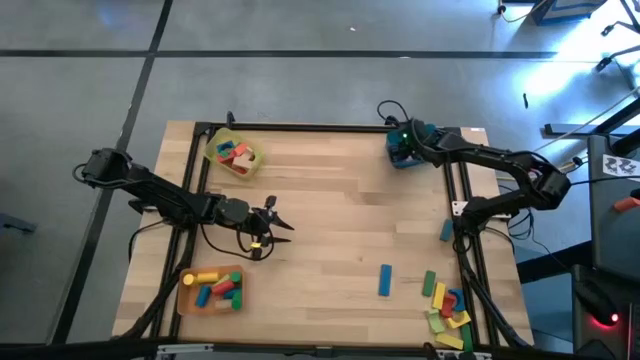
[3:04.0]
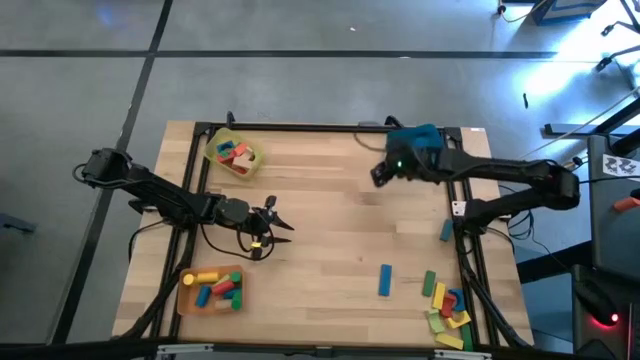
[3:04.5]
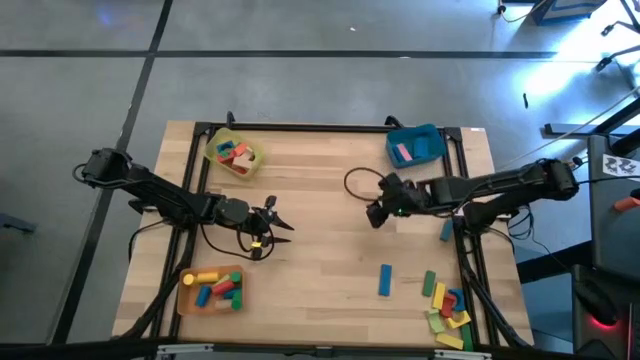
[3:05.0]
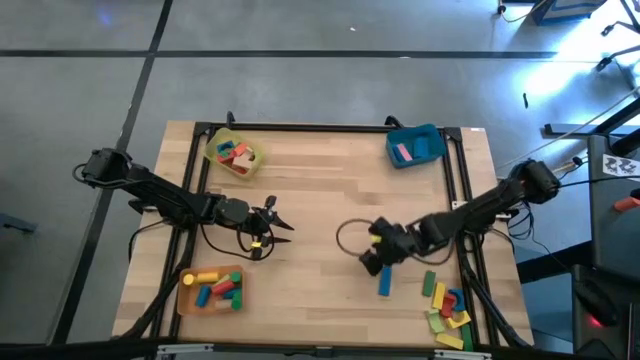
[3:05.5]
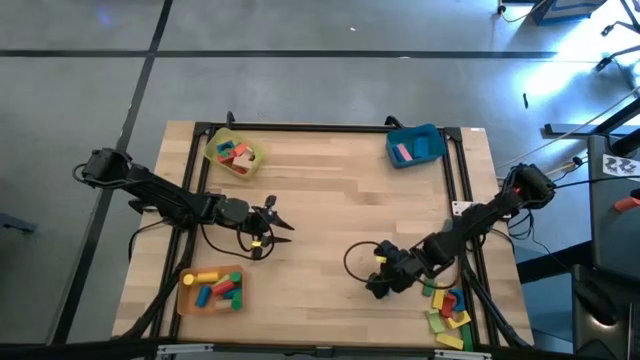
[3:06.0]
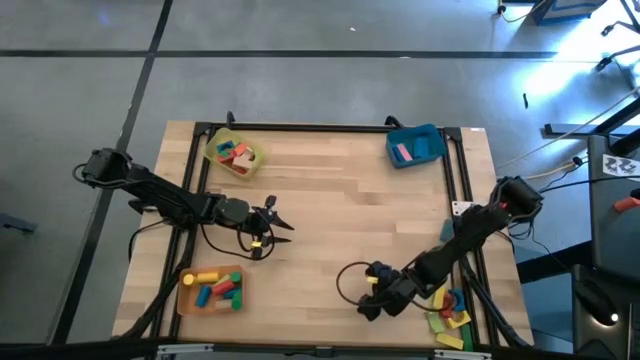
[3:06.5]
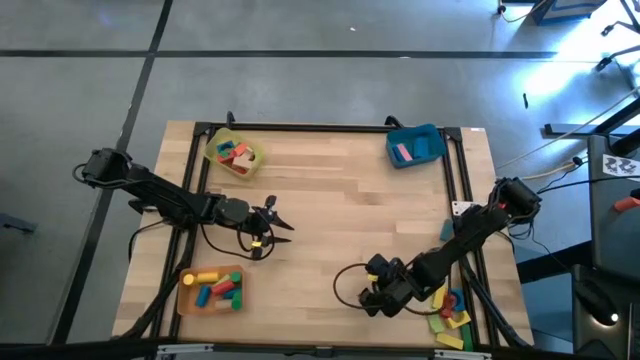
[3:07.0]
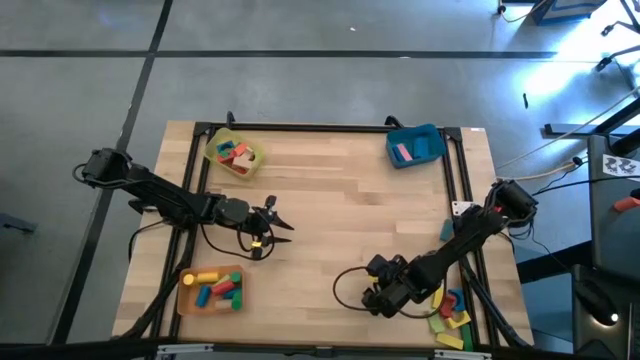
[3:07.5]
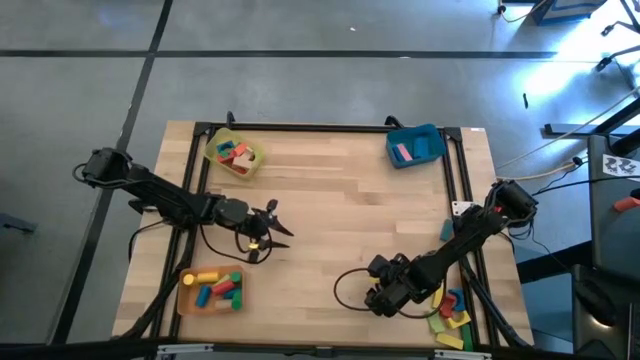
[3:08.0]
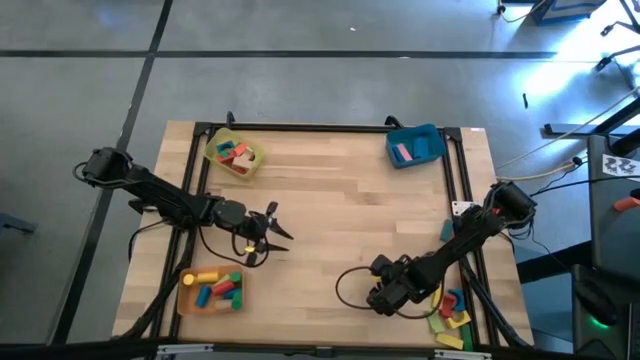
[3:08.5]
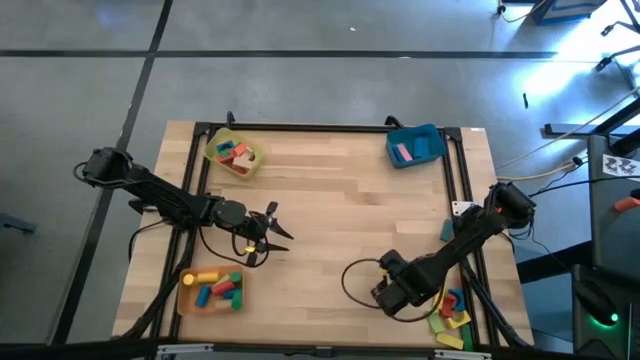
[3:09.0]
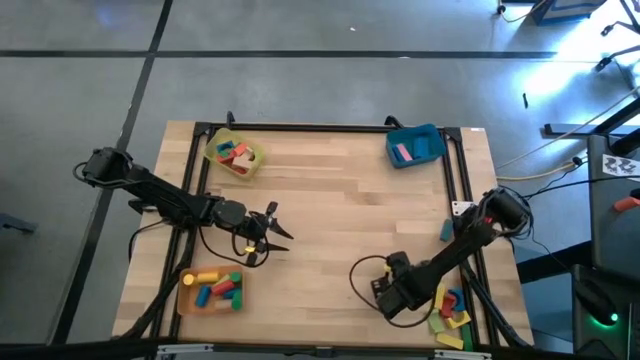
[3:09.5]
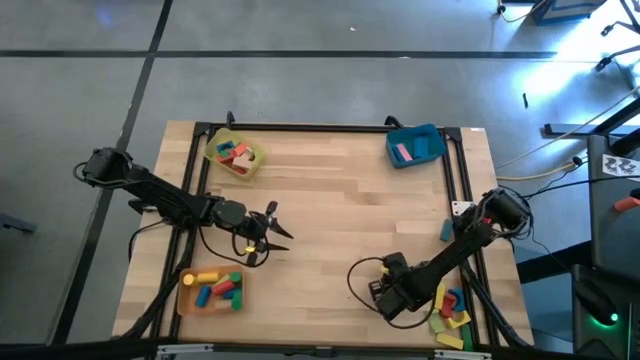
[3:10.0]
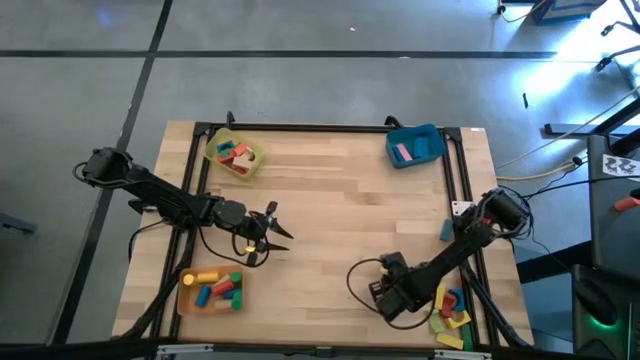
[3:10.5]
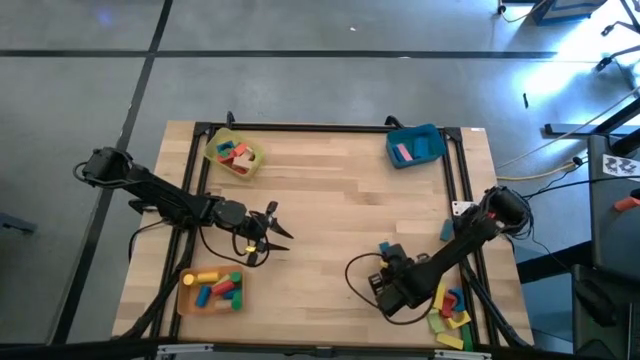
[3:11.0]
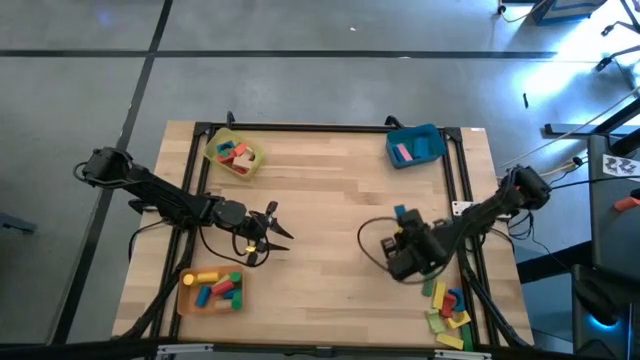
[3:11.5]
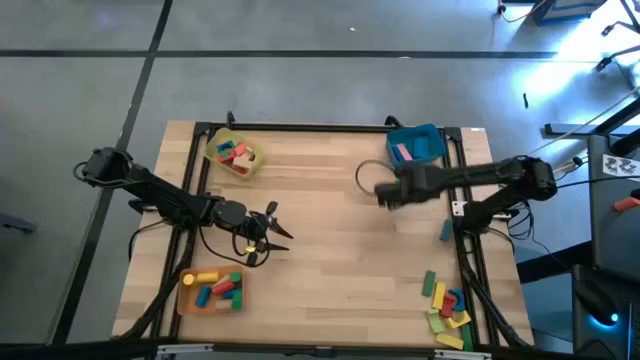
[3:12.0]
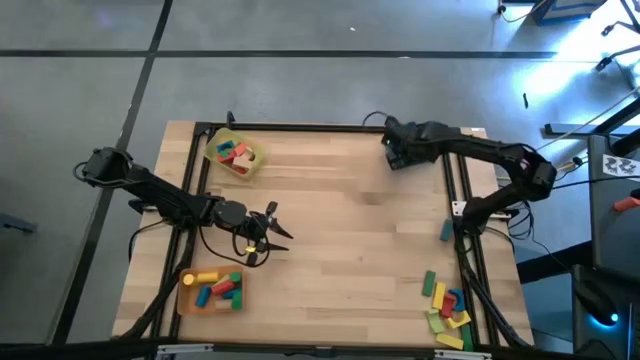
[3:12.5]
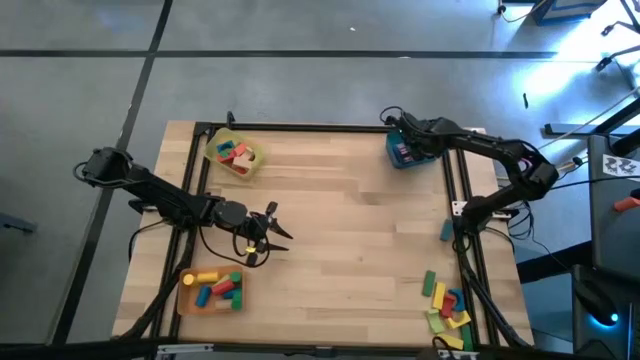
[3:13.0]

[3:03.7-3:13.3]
Task: Sort blocks by size
Put the blue rectangular block into the blue bin

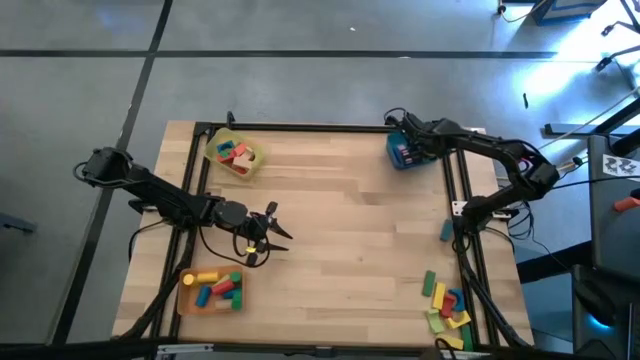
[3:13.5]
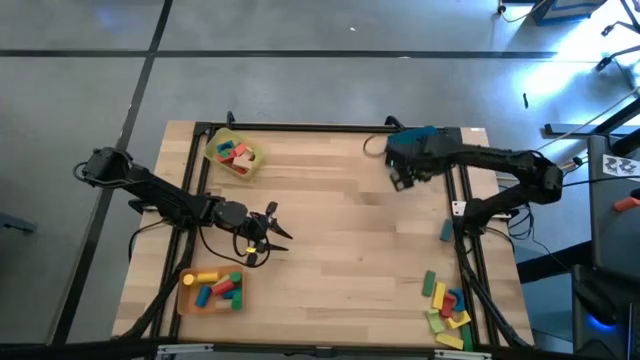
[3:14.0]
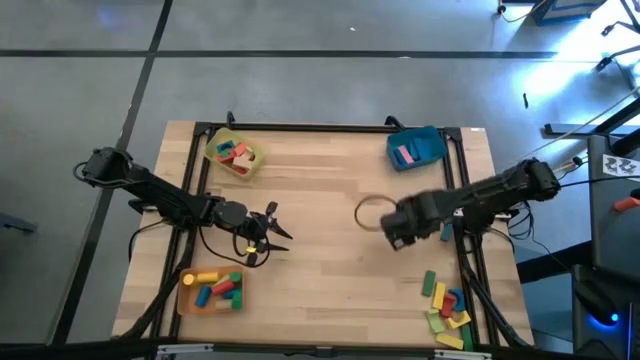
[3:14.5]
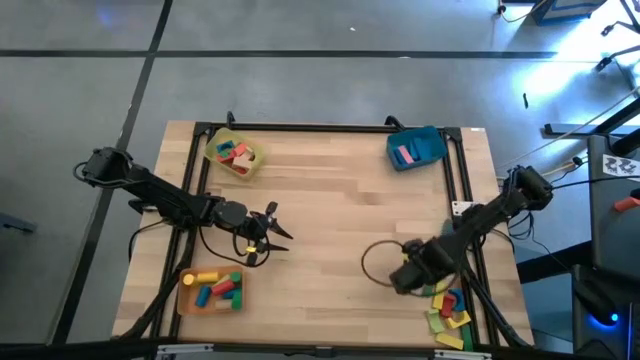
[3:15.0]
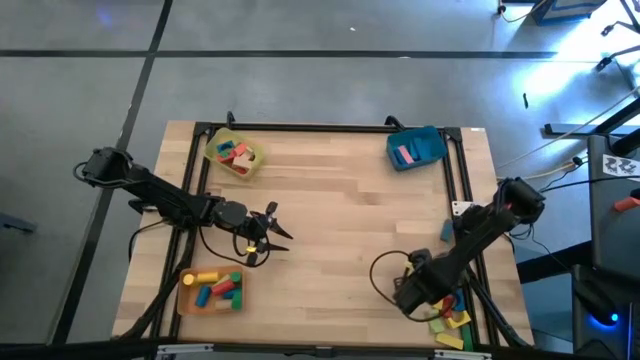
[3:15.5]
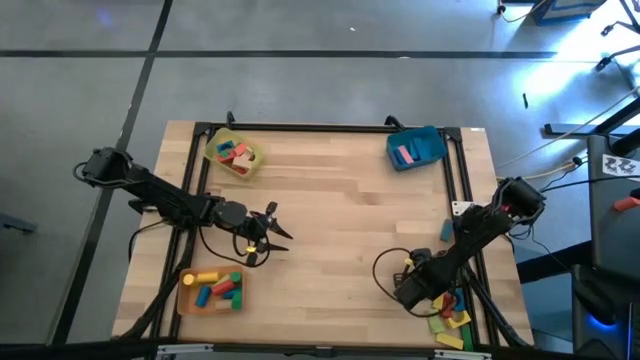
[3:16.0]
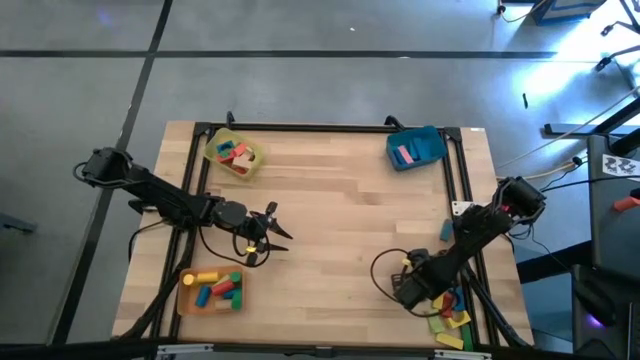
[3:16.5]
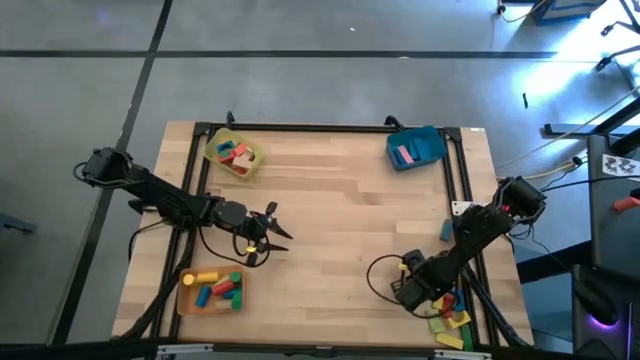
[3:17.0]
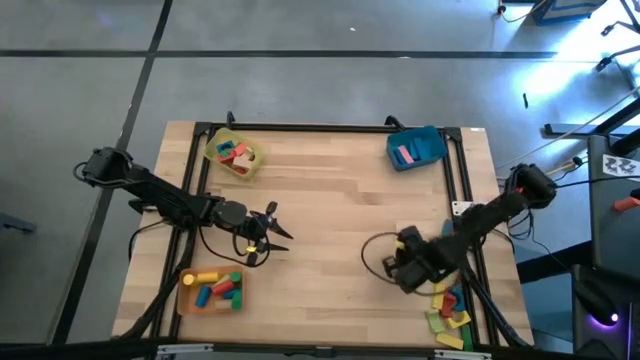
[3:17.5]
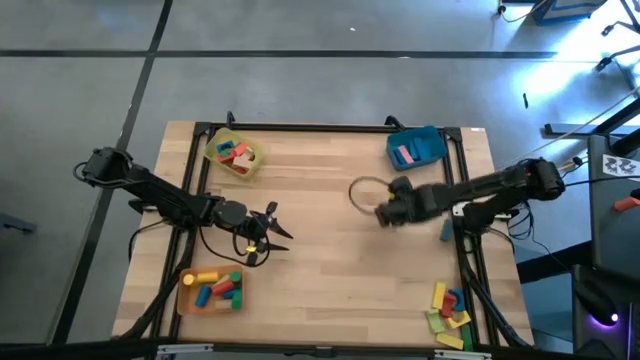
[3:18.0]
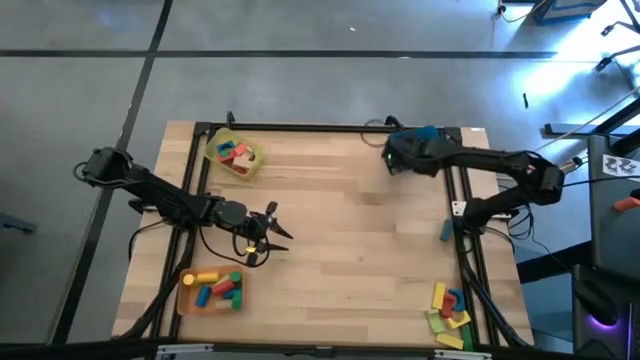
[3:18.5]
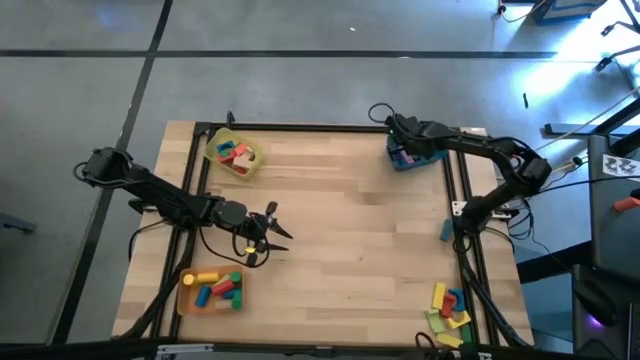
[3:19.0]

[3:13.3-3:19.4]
Put the green rectangular block into the blue bin

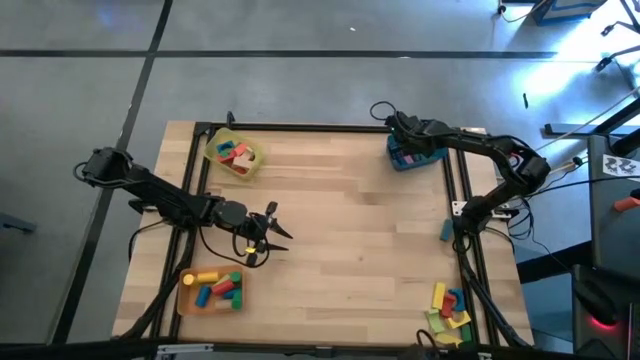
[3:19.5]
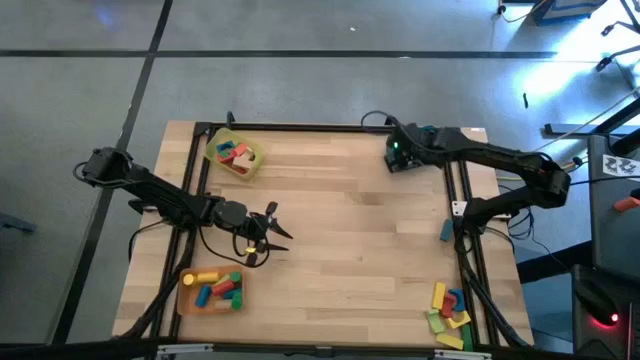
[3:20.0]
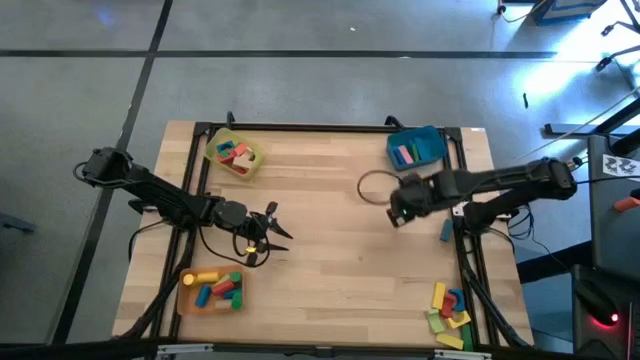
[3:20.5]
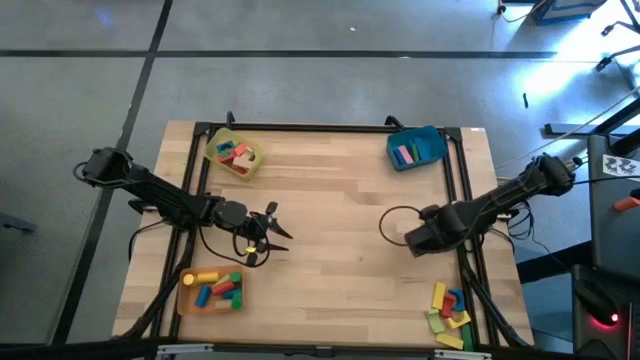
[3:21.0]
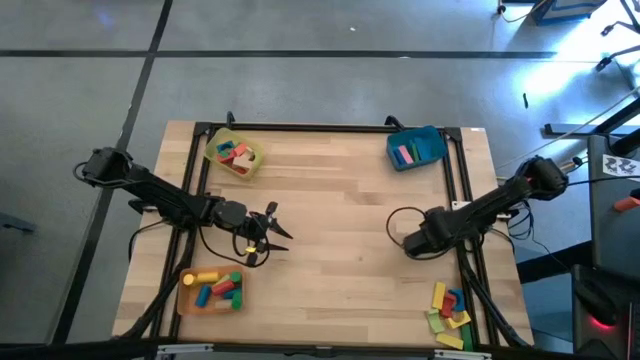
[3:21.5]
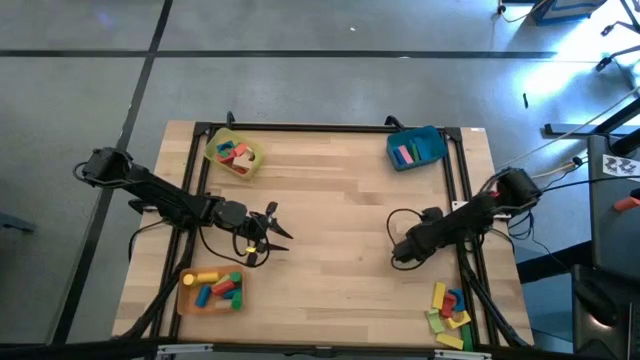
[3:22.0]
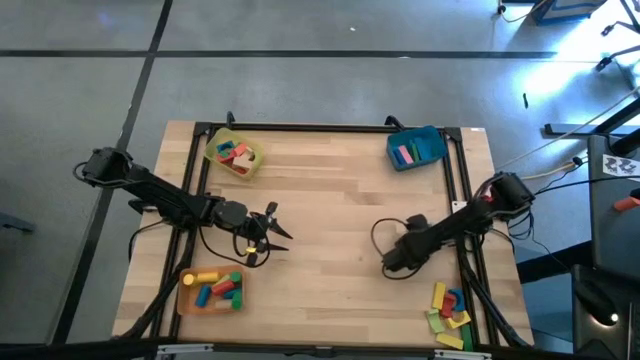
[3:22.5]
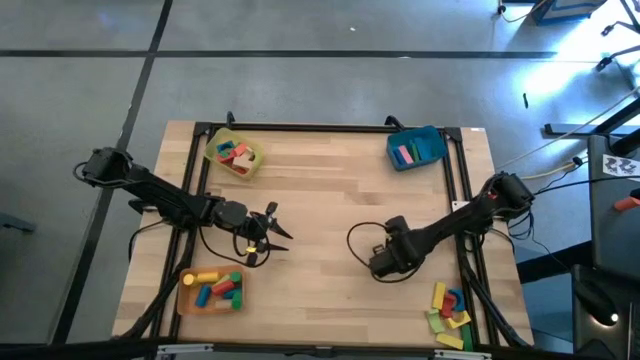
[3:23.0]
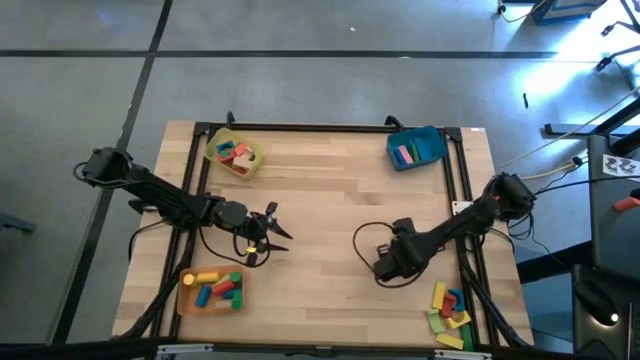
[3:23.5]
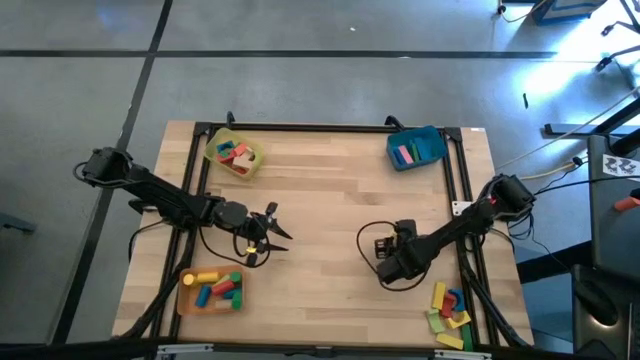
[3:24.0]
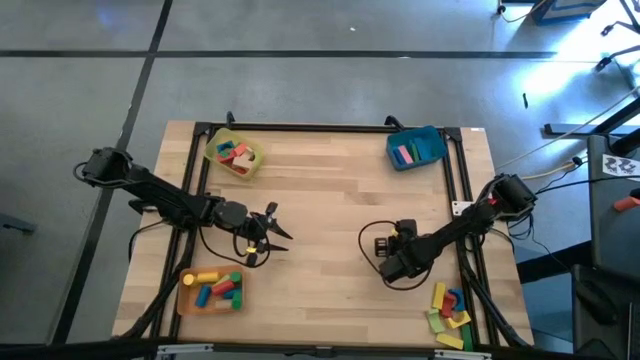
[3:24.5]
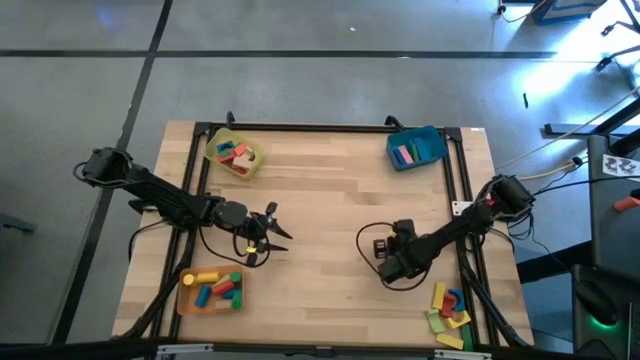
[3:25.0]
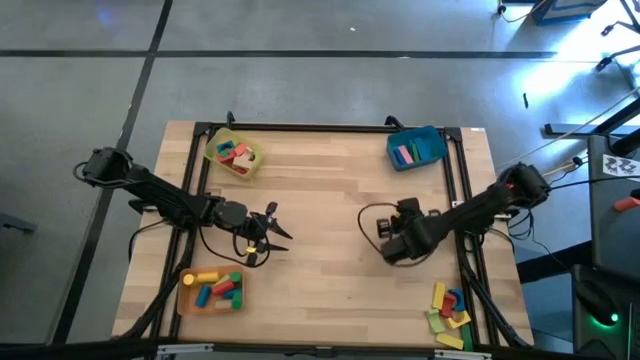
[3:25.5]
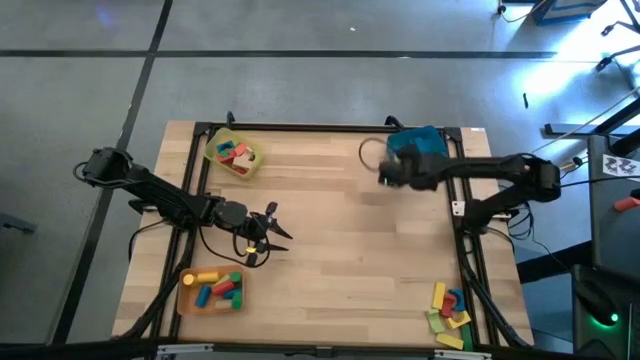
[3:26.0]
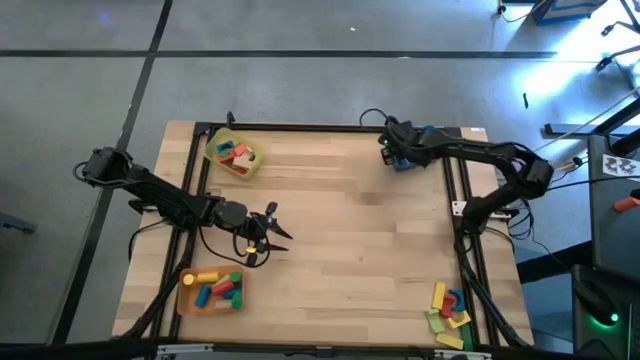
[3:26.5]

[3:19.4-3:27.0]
Put the blue rectangular block into the blue bin
